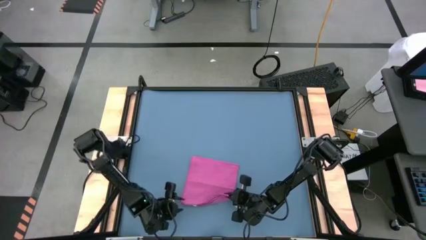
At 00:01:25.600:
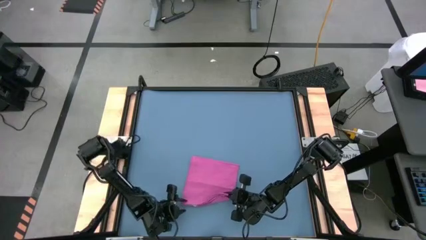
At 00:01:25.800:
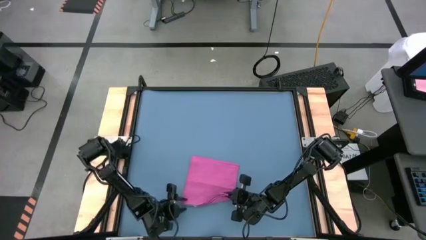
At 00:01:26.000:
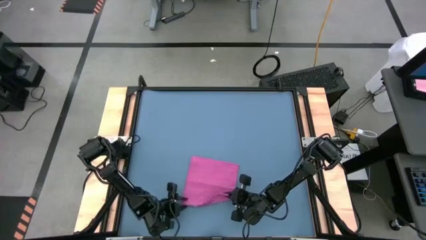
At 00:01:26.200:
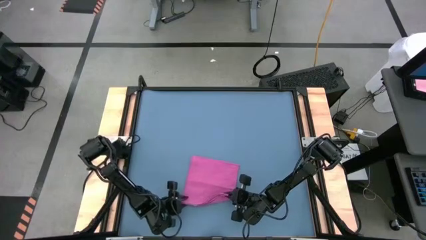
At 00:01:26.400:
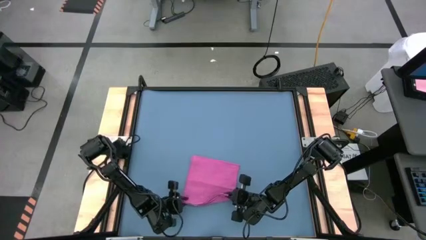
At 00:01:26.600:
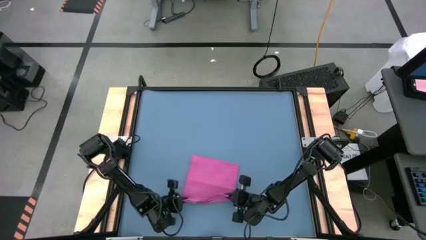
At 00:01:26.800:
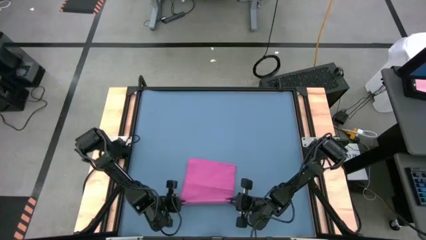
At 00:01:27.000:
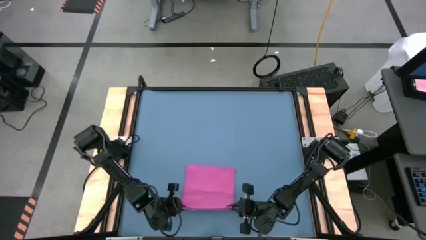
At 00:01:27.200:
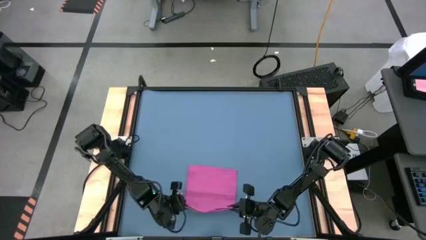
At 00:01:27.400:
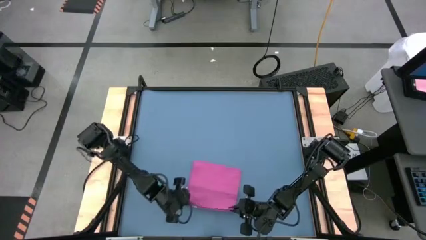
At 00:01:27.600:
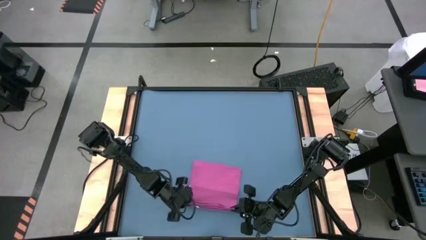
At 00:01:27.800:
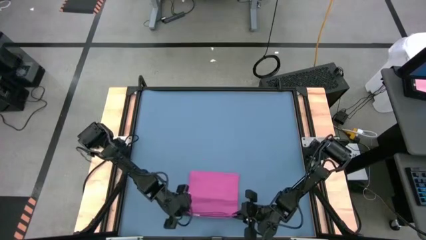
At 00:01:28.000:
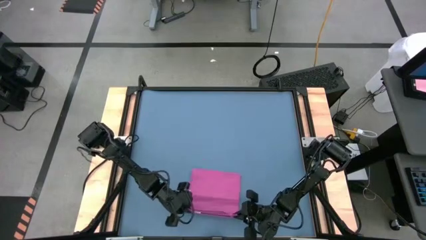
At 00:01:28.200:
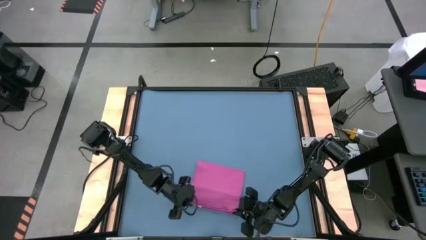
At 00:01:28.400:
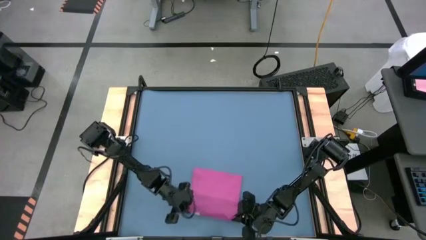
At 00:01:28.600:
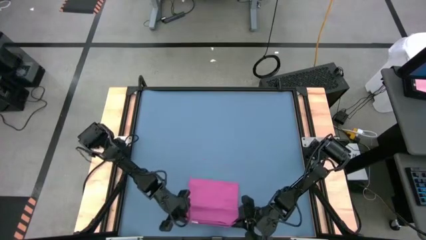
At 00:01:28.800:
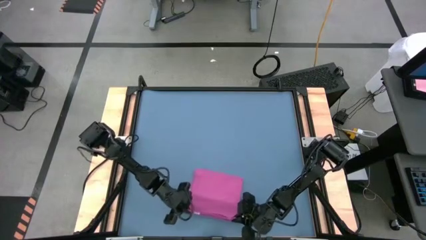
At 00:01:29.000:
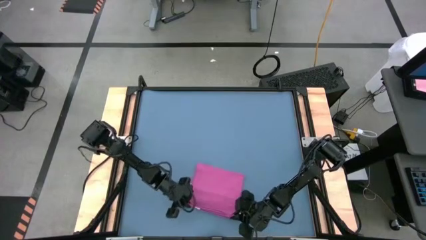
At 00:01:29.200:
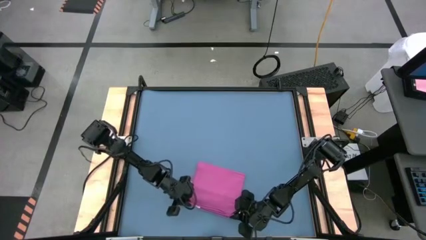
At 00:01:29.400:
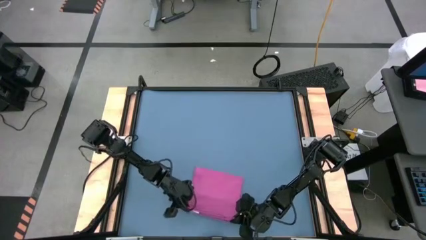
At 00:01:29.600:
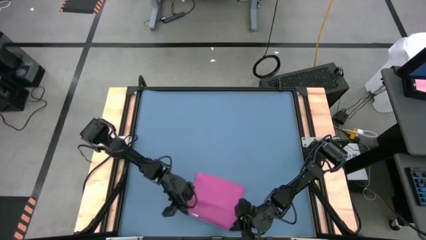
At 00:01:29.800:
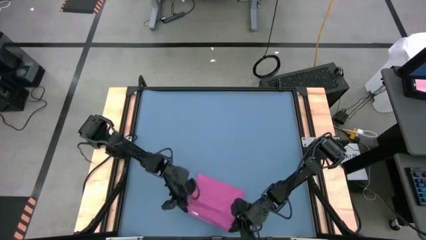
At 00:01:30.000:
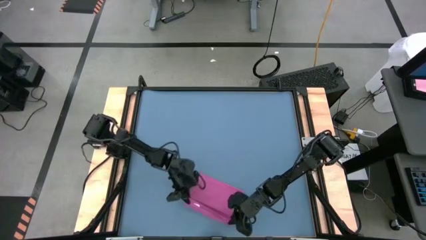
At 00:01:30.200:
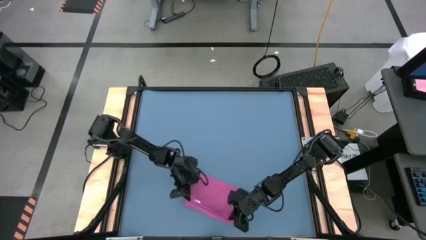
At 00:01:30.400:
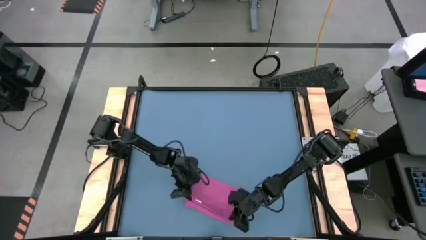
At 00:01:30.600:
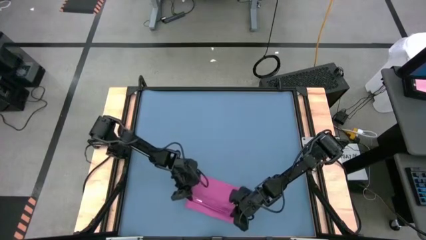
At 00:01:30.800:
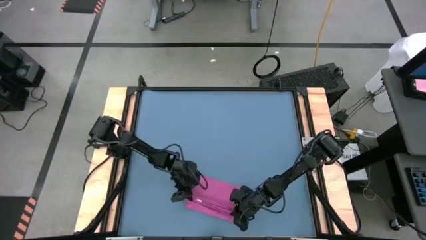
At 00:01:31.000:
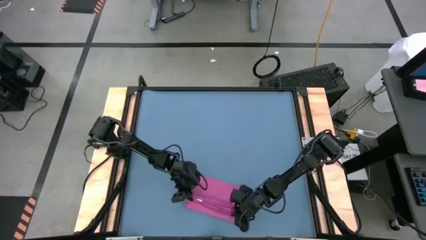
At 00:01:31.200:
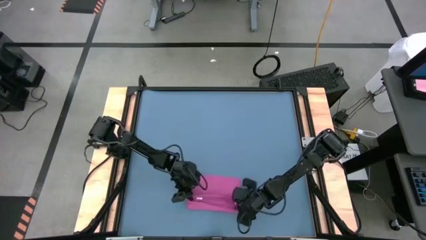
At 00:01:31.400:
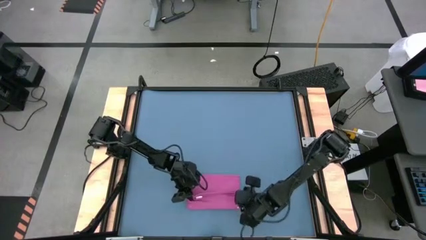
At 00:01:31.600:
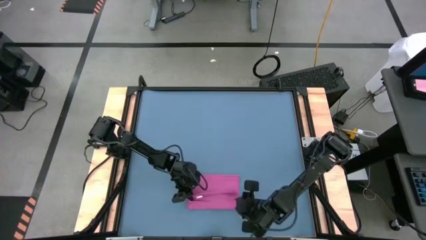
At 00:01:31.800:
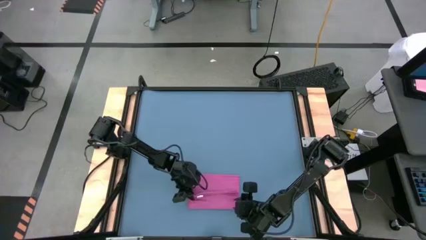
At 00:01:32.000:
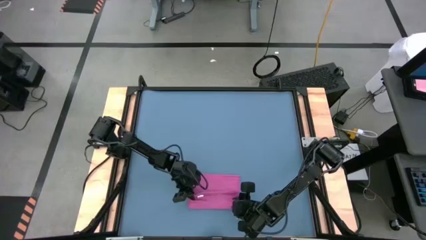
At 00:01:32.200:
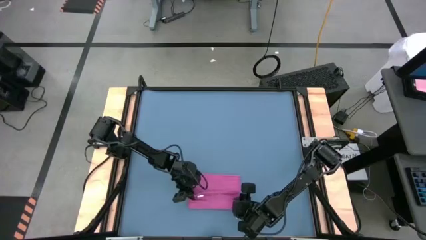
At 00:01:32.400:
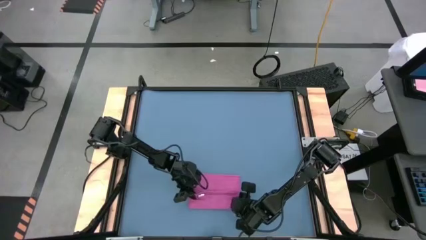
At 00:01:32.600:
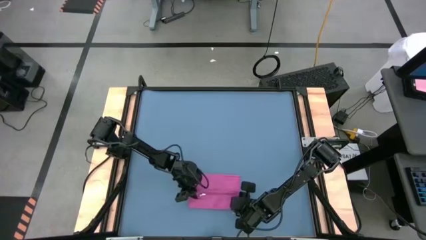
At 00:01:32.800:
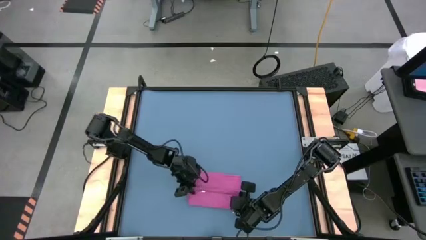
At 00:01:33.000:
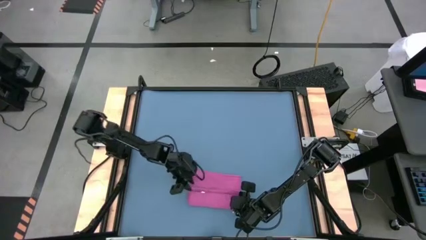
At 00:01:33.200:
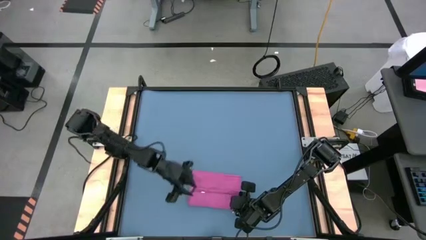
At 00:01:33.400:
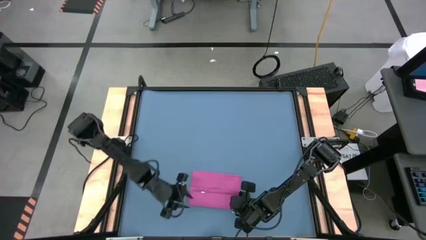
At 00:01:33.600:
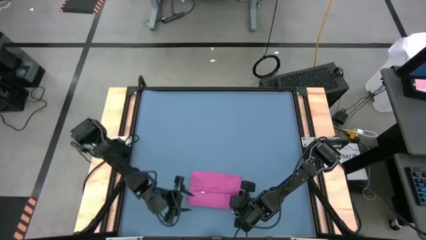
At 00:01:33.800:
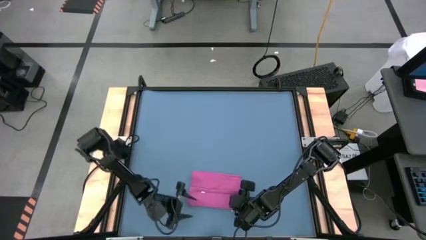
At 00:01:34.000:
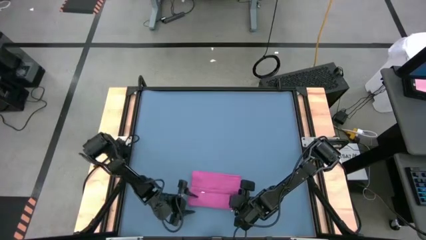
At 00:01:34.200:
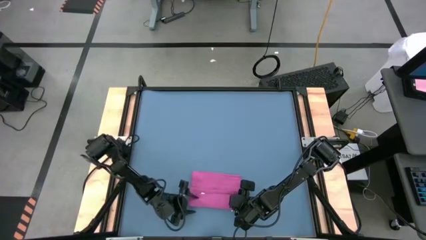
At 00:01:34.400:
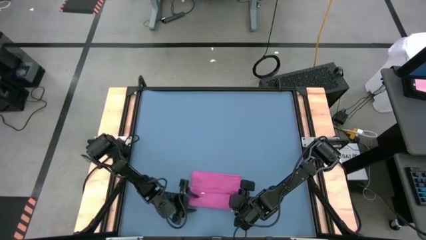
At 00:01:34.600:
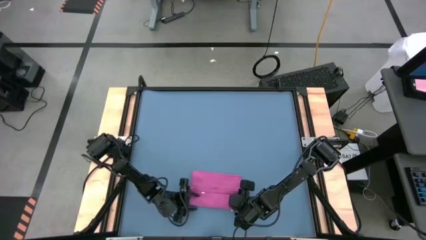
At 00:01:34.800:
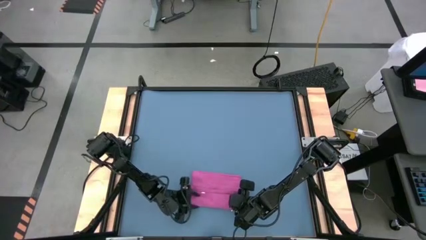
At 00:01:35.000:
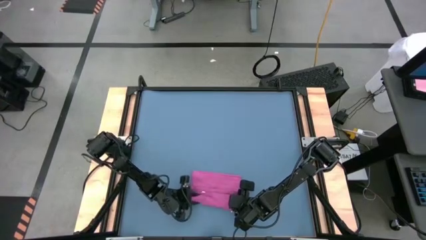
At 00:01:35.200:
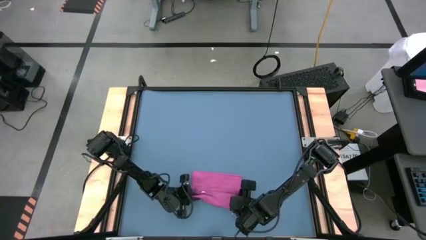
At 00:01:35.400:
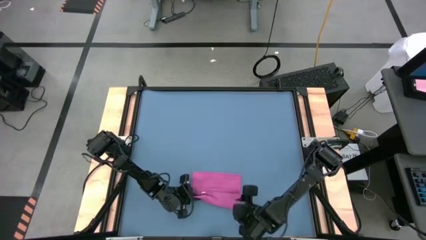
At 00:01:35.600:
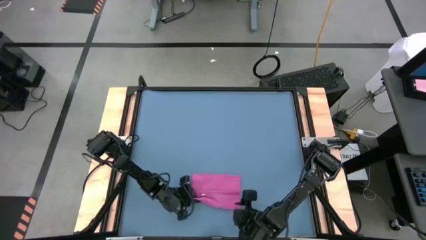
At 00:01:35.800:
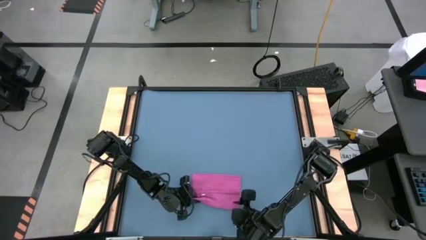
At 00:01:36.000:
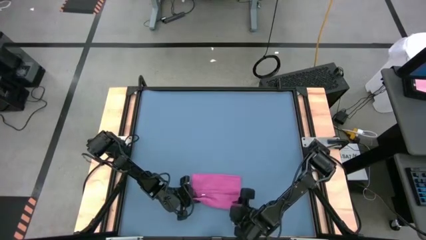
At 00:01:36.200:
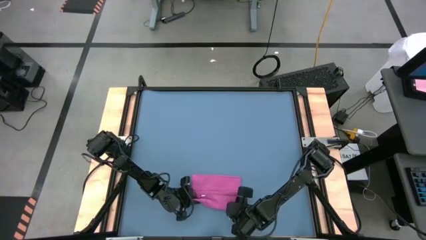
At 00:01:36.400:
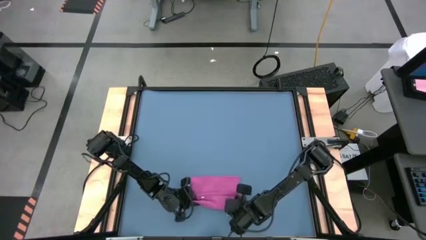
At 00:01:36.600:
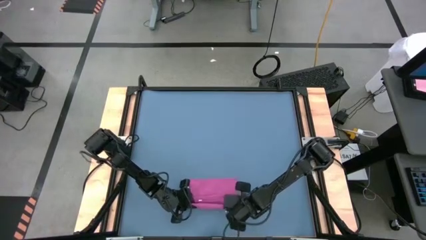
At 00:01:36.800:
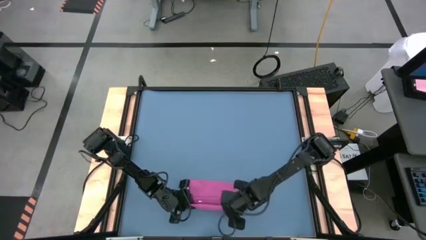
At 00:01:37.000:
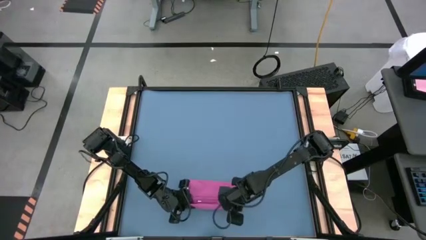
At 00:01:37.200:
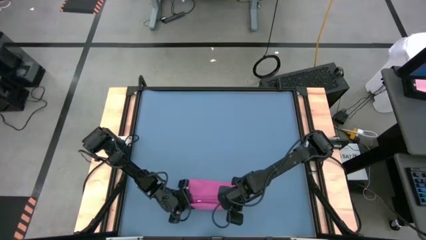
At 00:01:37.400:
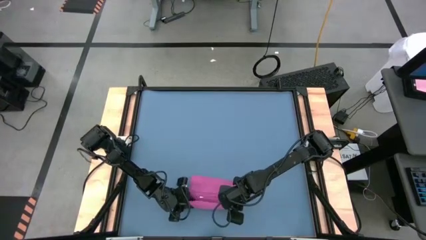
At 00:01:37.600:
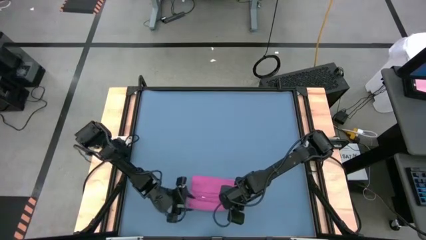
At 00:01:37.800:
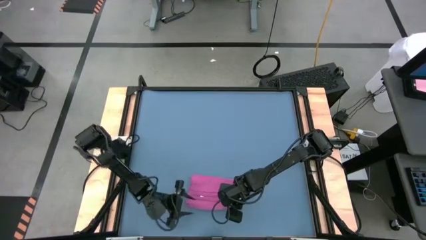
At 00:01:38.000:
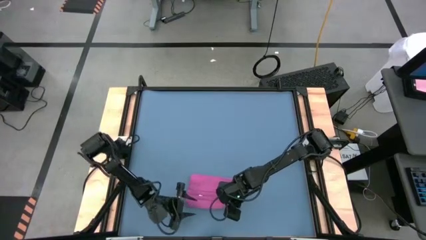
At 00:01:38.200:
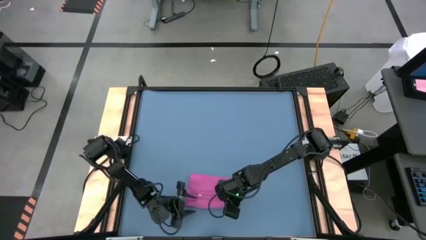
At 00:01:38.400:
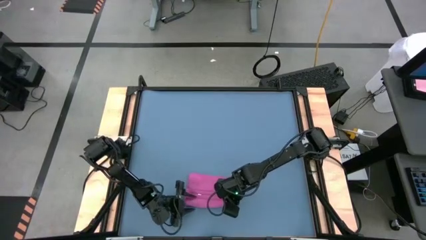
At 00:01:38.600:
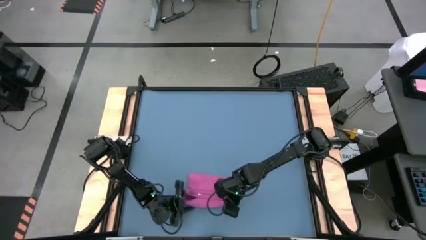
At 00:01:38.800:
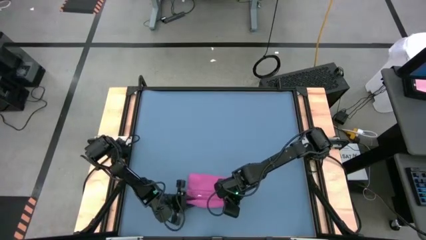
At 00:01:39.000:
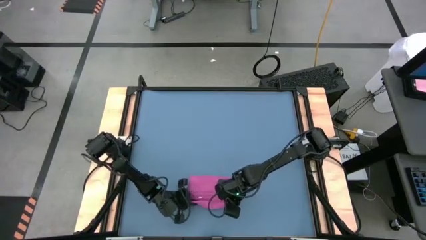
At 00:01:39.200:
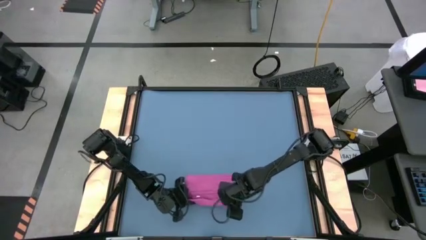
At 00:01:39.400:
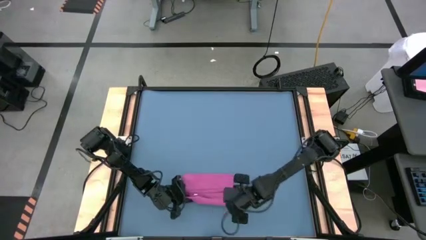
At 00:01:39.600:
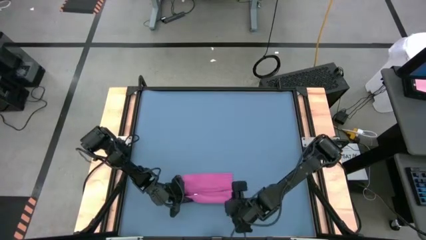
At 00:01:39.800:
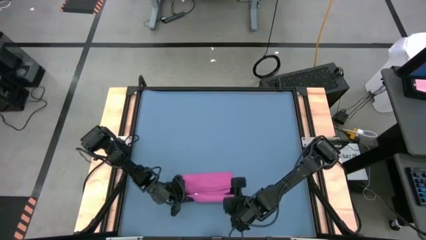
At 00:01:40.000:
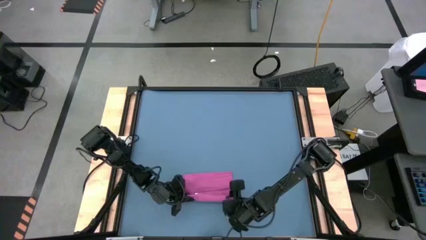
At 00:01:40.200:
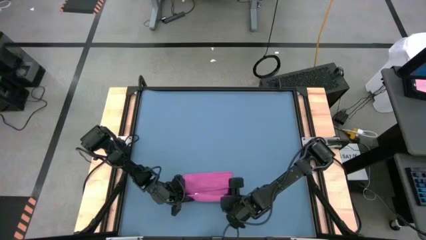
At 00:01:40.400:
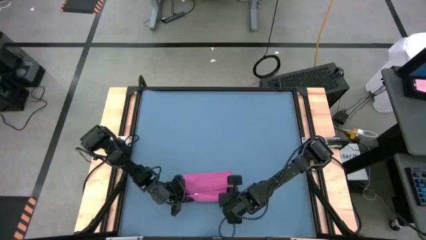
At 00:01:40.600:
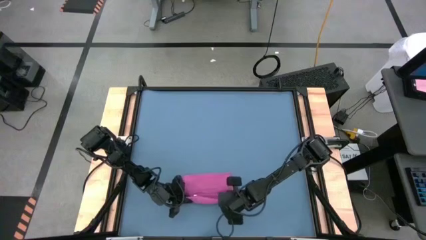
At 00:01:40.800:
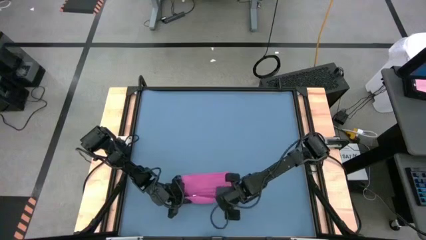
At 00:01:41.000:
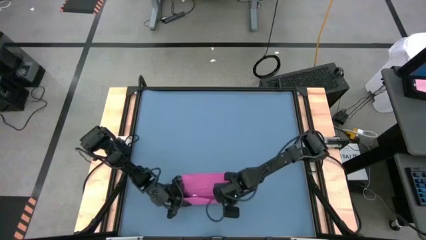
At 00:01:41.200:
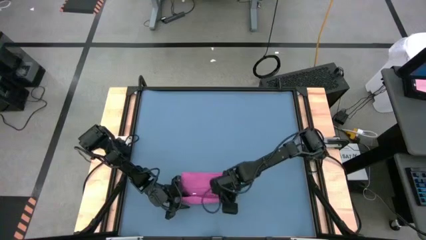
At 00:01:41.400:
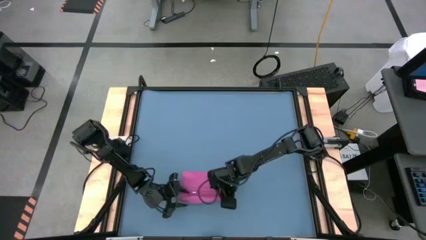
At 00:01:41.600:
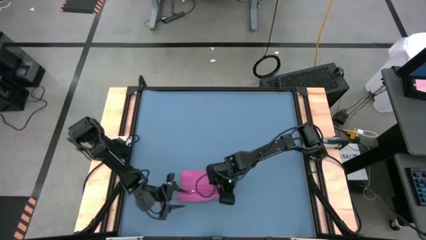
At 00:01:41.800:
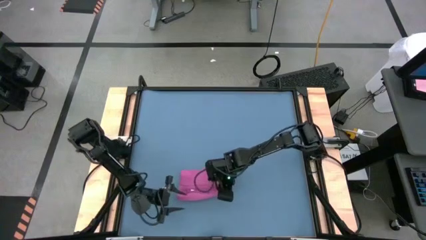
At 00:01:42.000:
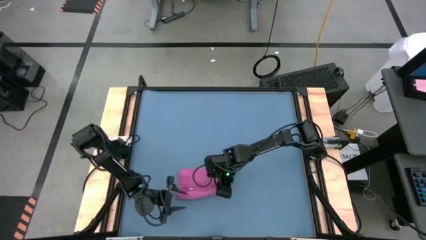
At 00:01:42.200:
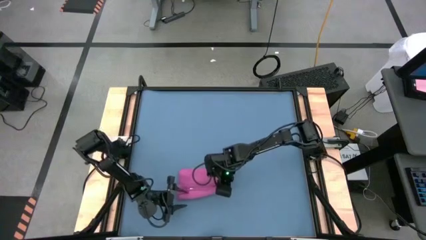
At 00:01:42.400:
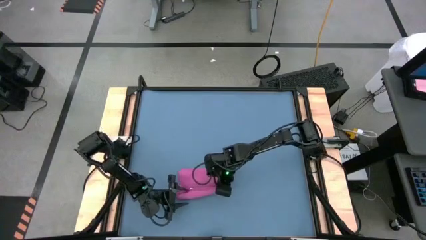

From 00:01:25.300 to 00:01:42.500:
Task: Roll towel
Roll the light red towel
